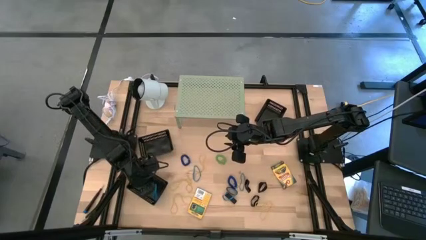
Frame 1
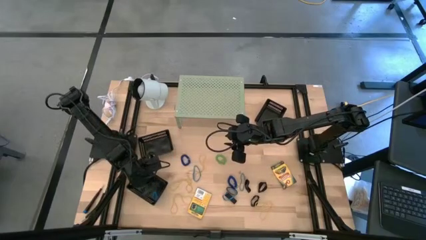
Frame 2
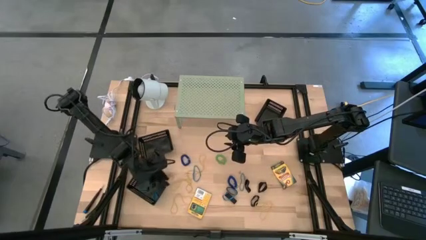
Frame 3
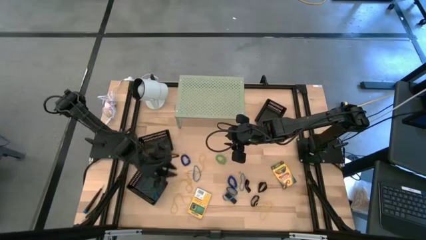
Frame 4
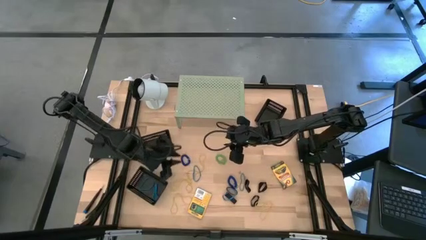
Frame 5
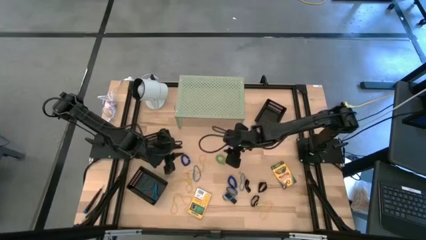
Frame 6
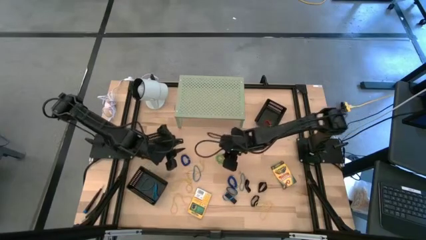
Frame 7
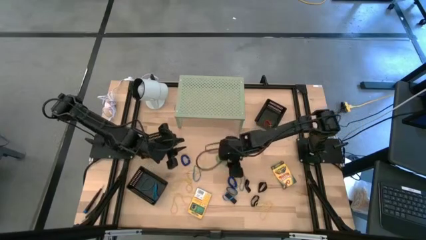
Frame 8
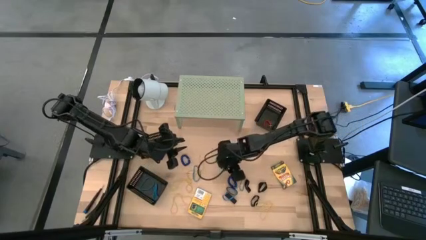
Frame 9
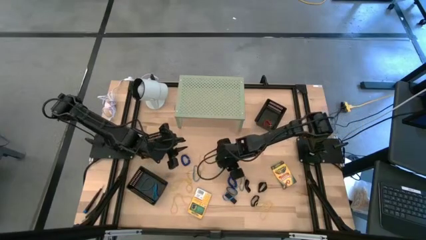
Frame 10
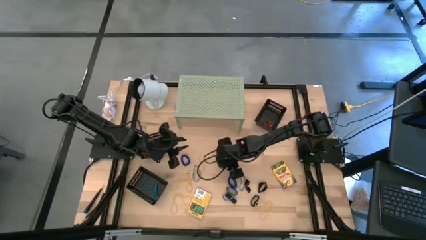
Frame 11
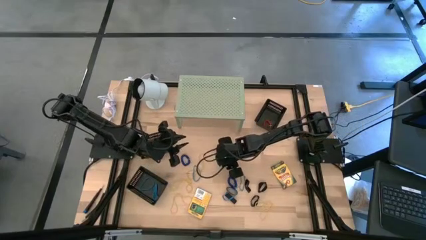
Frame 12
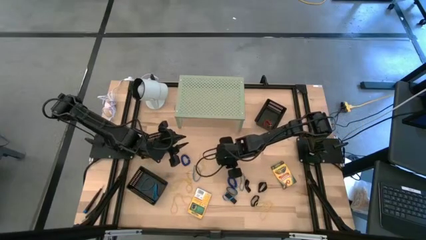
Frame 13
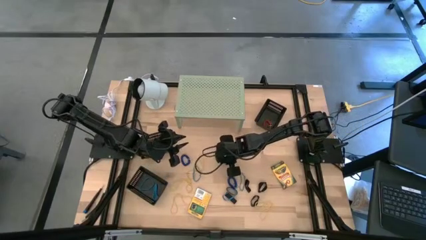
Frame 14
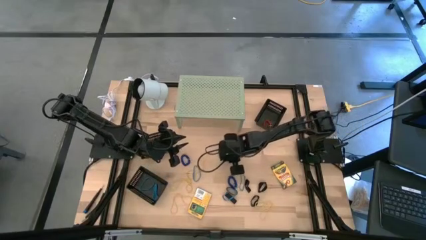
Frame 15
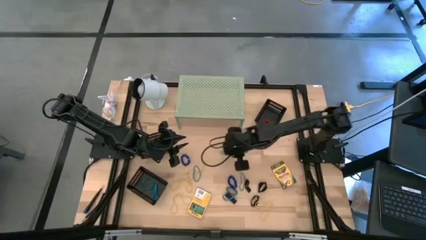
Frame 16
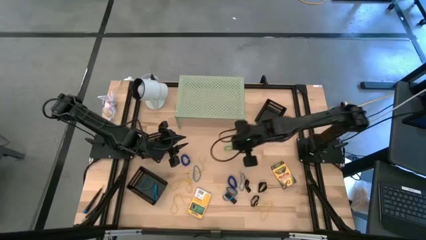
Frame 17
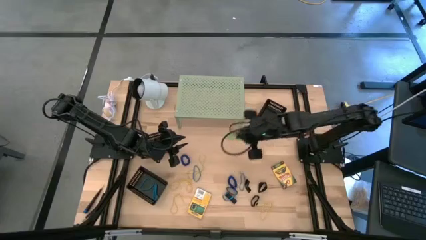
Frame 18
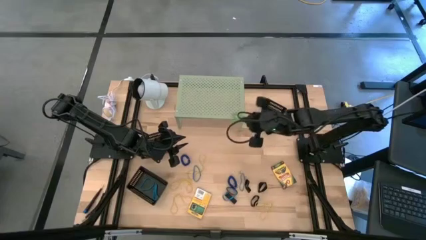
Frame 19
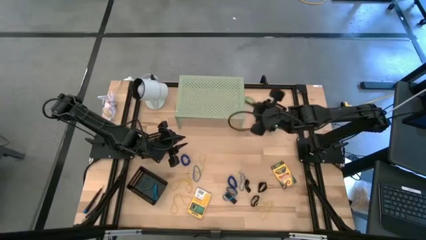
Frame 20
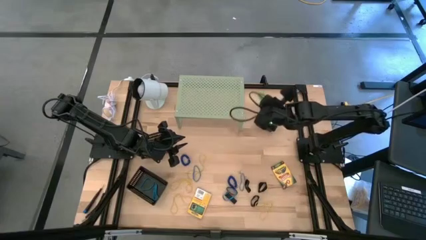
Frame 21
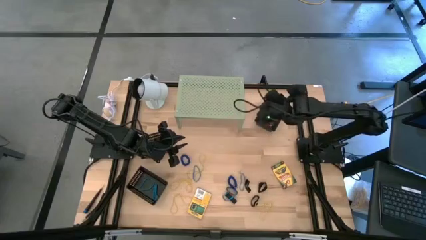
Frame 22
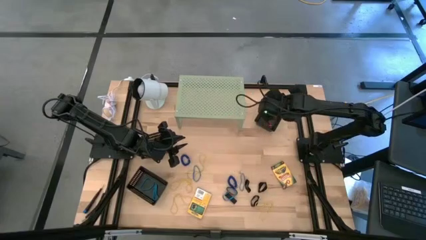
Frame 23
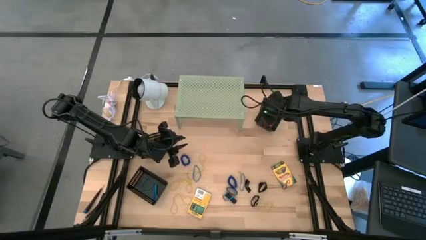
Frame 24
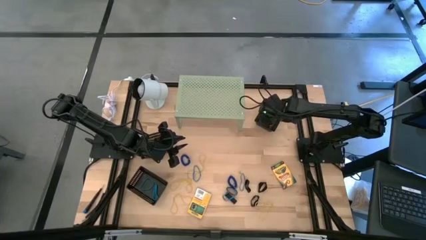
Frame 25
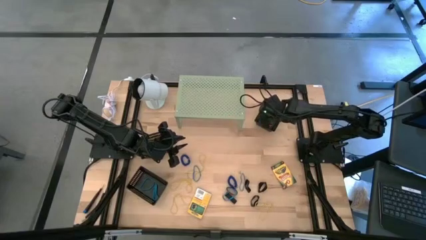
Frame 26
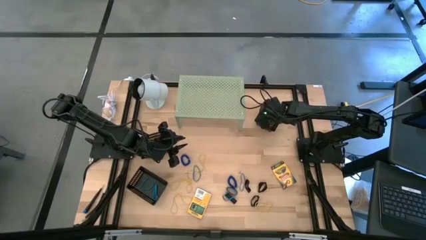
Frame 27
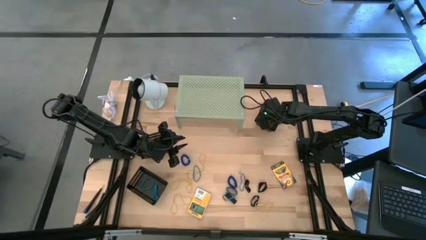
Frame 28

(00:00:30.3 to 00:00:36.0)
Task: Pick & Place Office Desk Supplies
Put the green spring keychain into the top right black bin

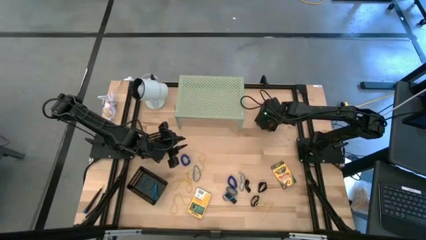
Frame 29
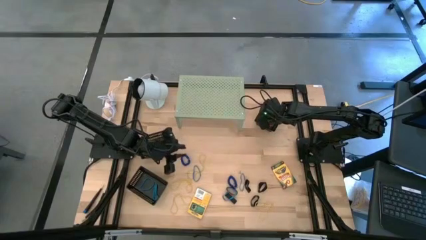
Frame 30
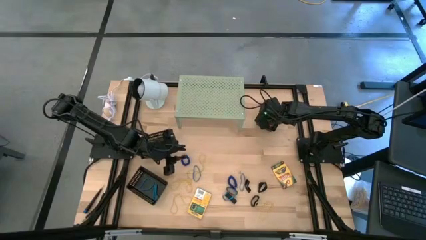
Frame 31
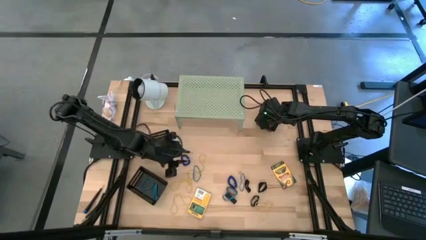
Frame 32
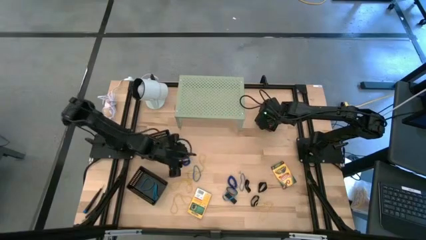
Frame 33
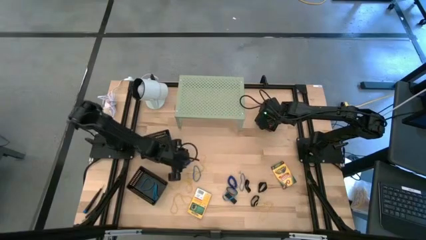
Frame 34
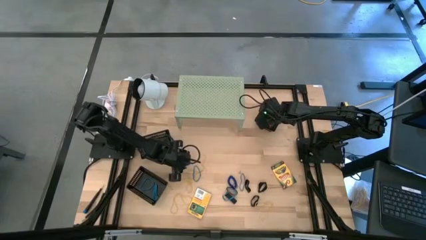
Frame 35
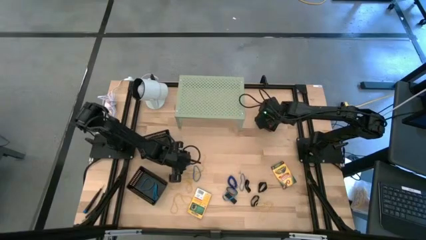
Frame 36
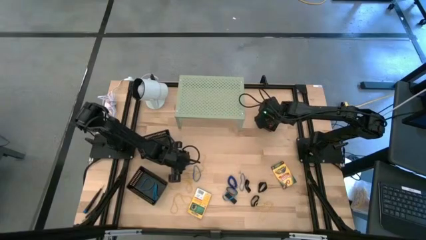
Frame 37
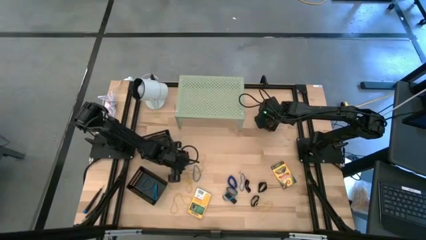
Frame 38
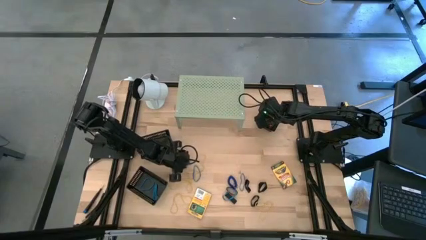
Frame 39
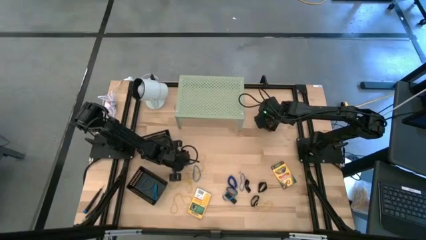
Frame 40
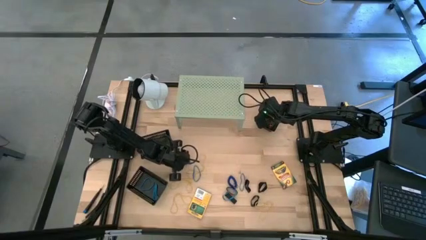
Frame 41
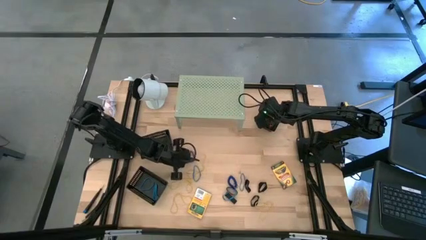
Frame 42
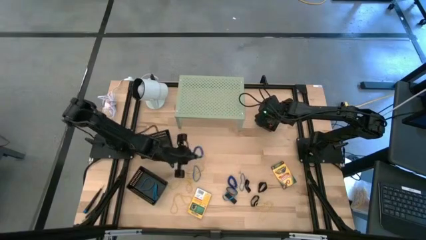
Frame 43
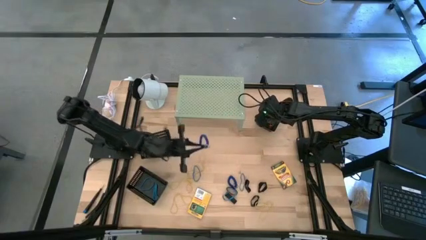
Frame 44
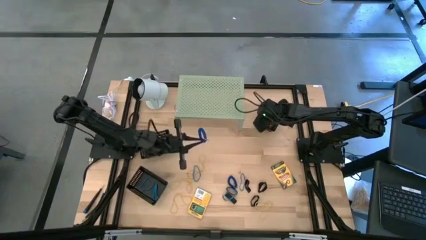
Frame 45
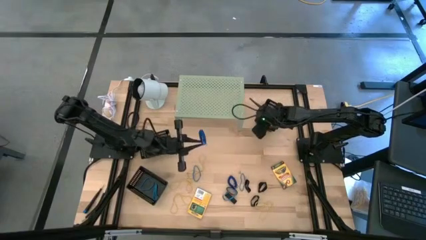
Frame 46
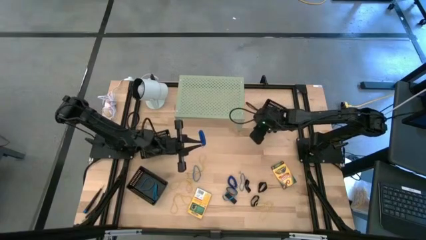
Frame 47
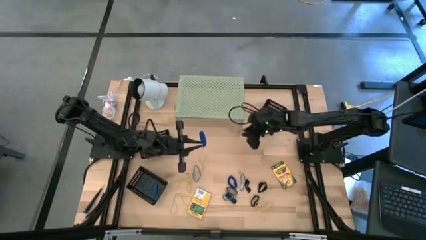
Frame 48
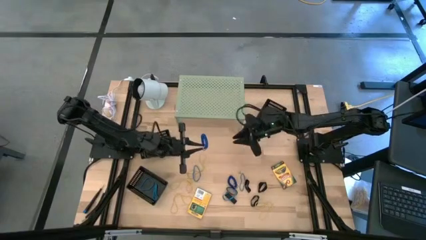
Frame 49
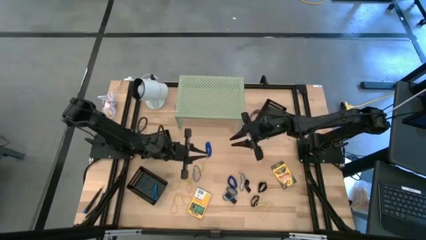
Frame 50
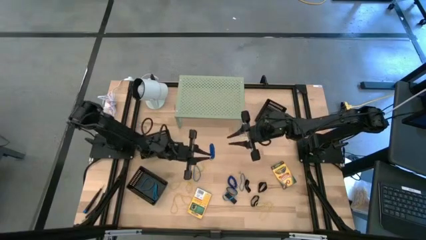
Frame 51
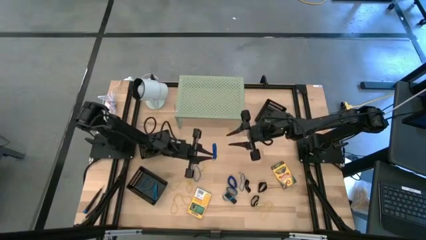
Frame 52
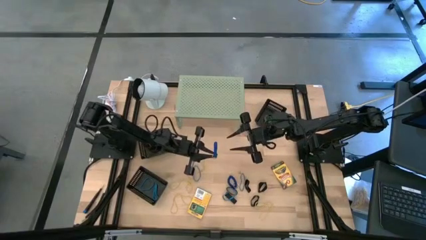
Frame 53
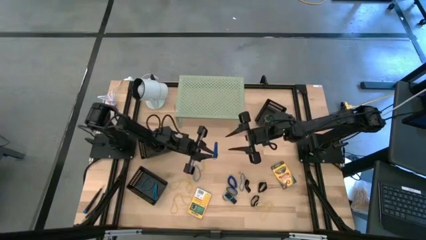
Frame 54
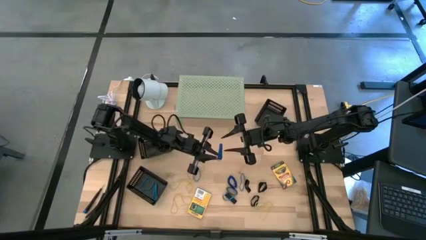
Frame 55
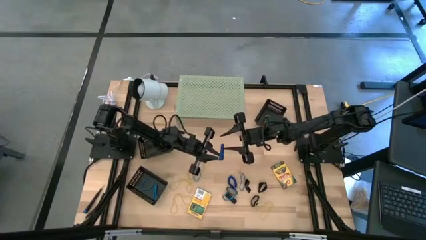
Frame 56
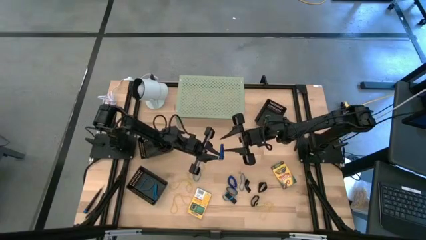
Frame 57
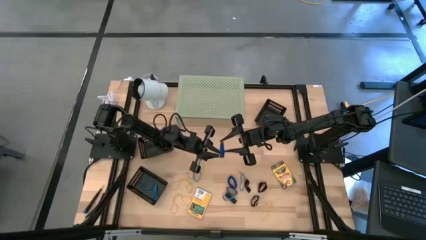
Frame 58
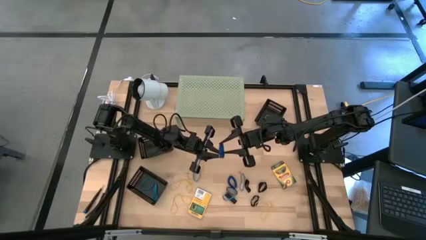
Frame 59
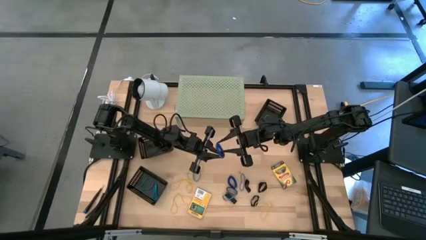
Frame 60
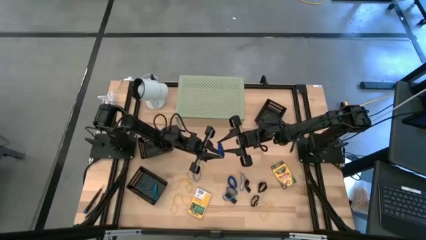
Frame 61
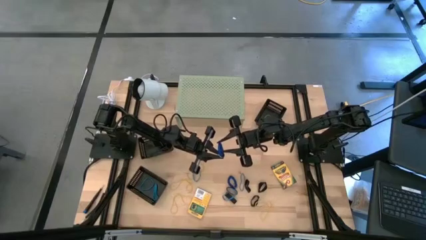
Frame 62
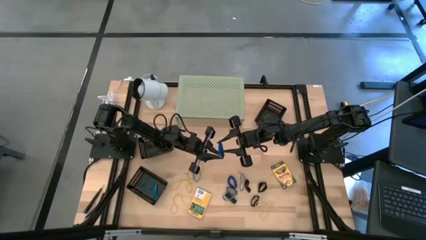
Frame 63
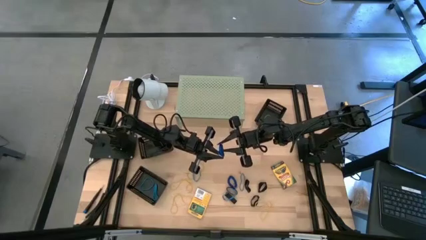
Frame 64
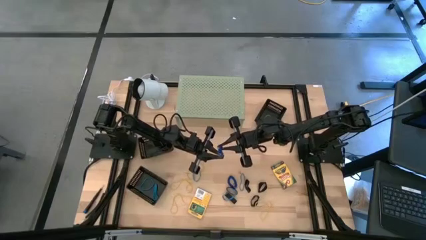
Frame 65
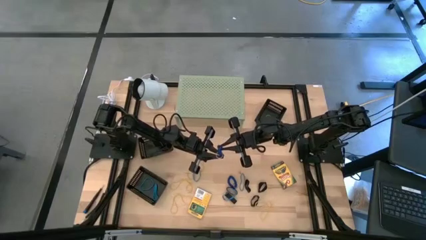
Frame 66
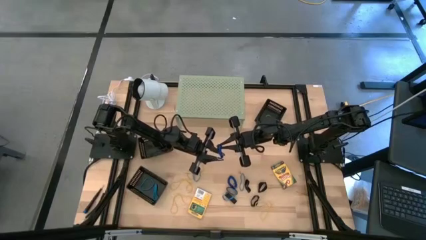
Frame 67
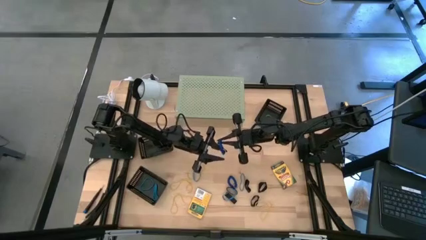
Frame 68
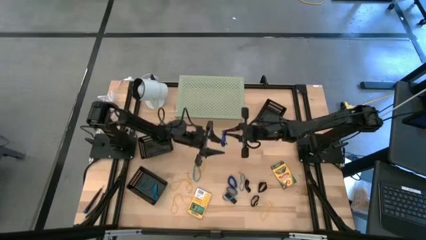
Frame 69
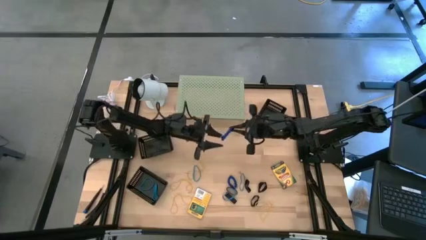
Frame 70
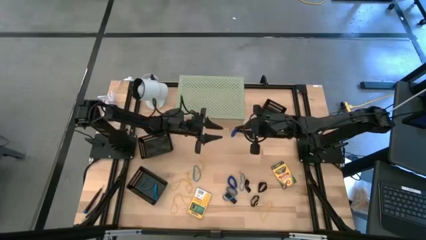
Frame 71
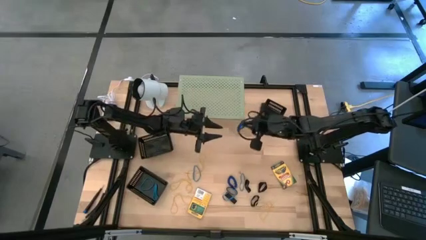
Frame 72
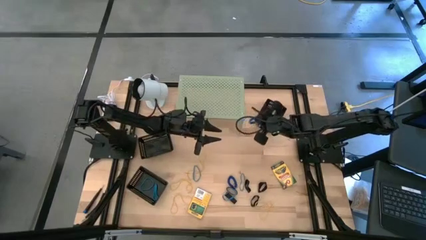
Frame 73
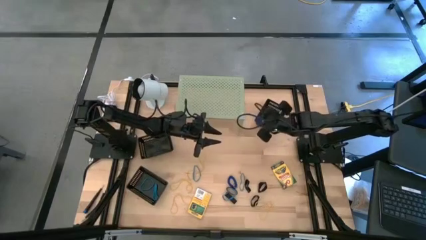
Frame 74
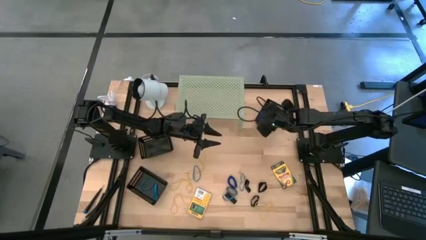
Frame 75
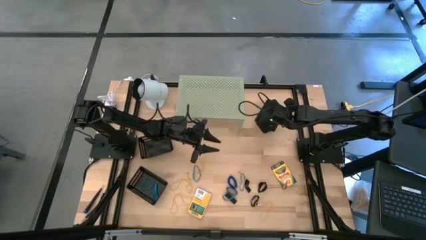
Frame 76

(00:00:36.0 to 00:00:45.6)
Put the blue spring keychain into the top right black bin
